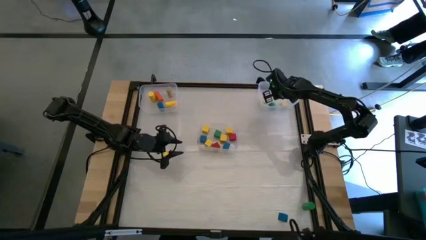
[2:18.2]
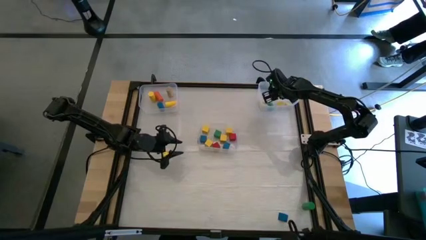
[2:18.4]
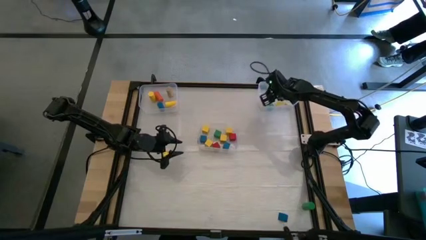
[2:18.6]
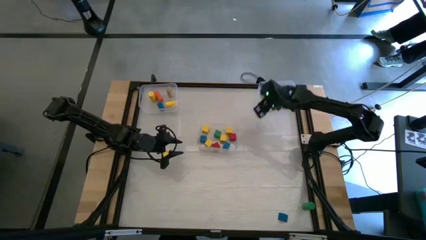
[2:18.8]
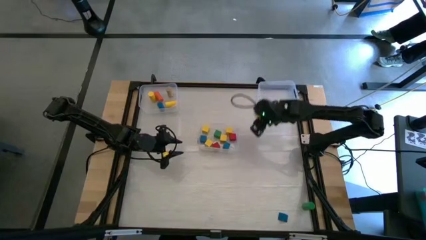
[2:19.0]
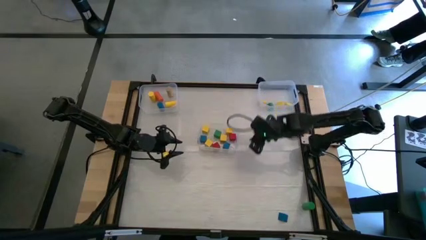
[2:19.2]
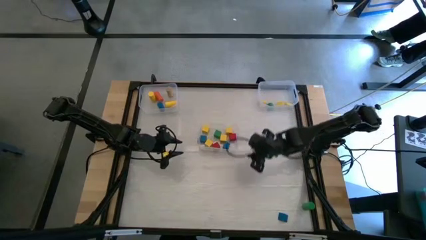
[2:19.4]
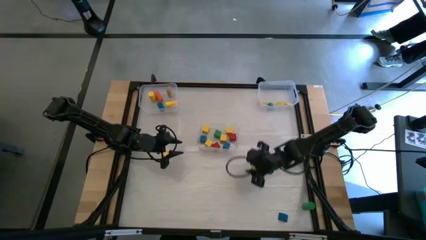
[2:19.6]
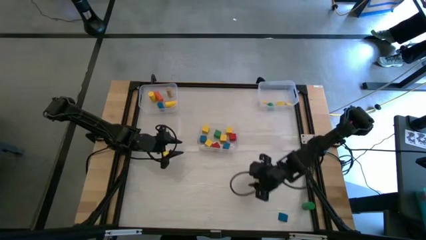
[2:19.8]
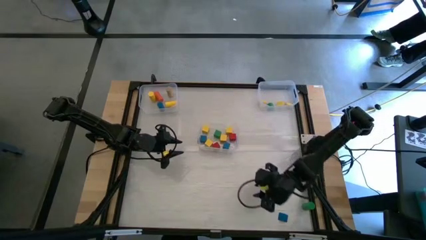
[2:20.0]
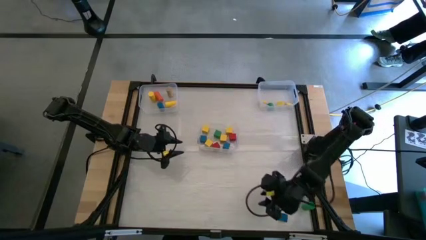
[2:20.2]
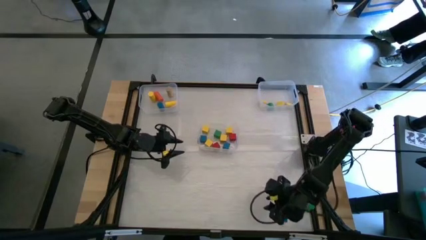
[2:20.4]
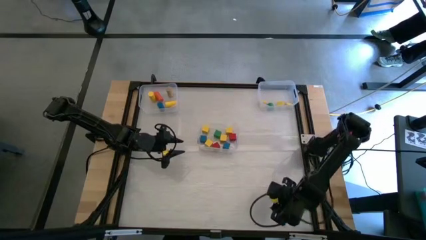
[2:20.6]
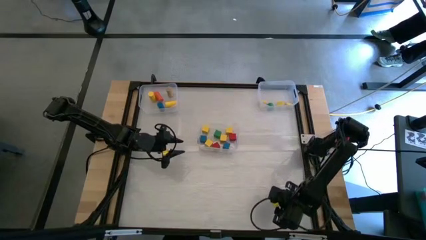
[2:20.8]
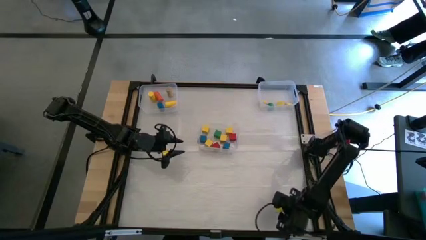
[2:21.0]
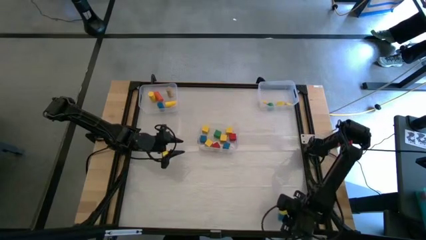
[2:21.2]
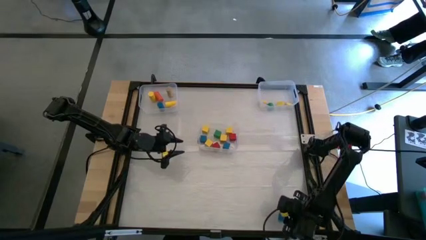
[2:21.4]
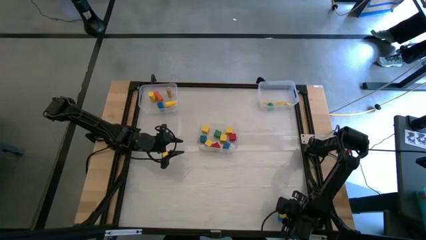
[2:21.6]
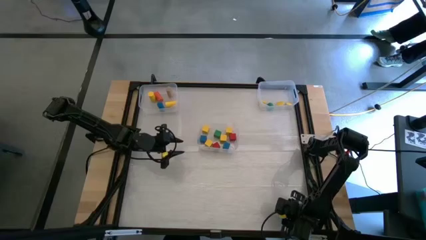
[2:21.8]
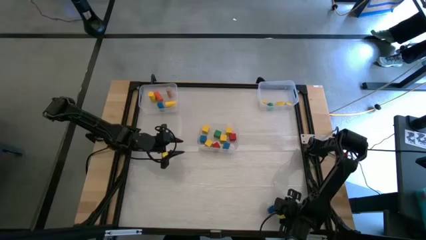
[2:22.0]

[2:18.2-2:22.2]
Task: Sort blocks by size
Put the blue triangular block into the top right transparent bin

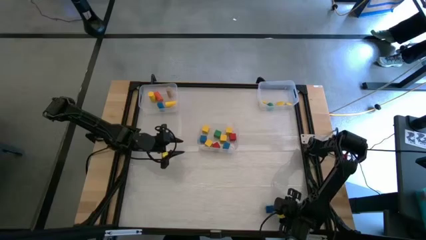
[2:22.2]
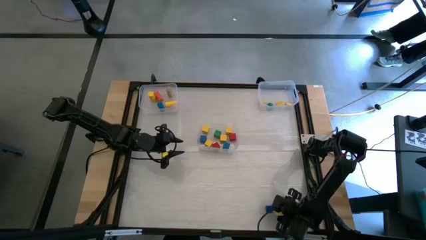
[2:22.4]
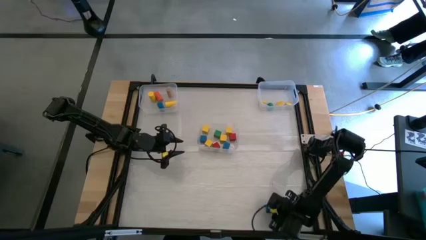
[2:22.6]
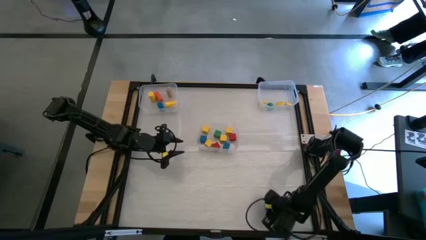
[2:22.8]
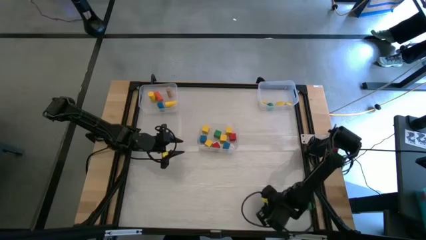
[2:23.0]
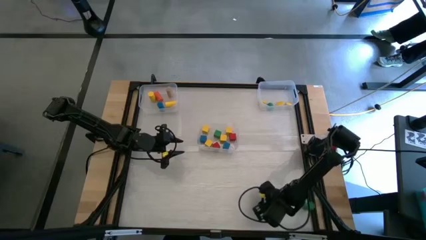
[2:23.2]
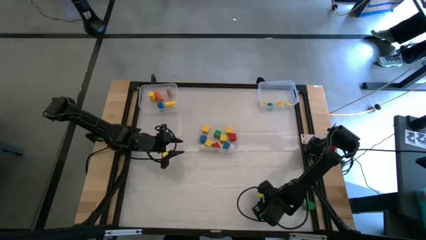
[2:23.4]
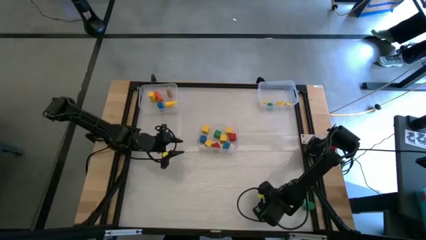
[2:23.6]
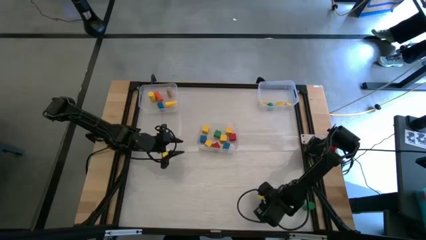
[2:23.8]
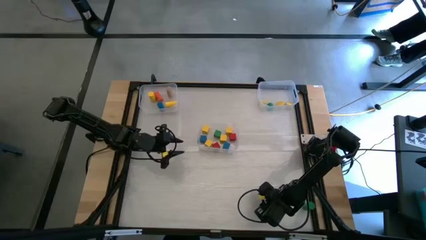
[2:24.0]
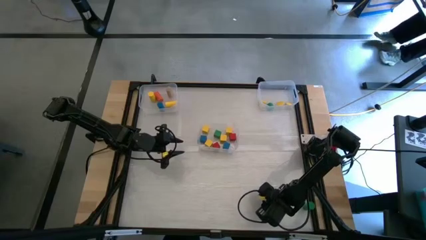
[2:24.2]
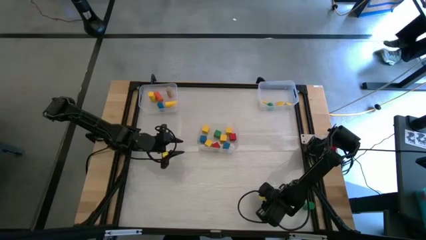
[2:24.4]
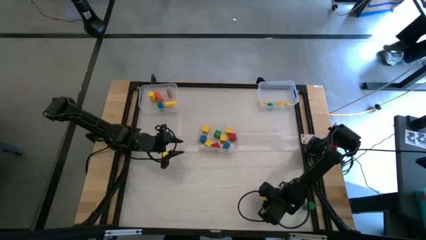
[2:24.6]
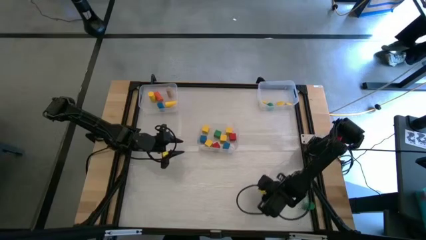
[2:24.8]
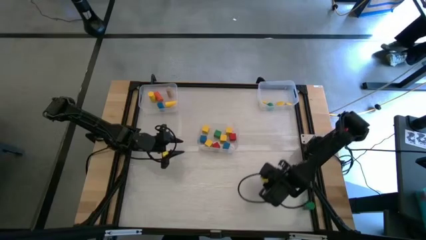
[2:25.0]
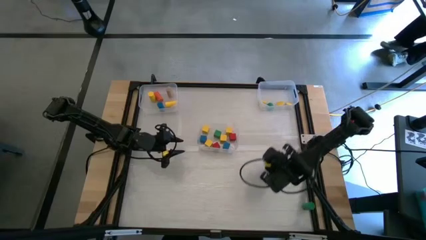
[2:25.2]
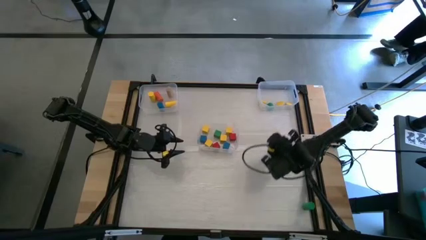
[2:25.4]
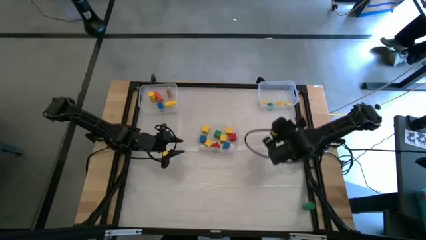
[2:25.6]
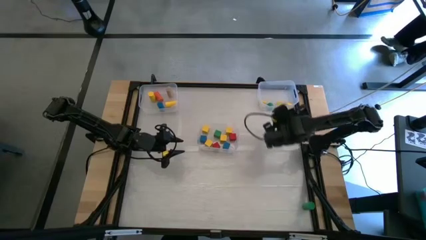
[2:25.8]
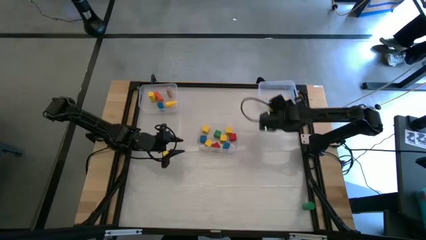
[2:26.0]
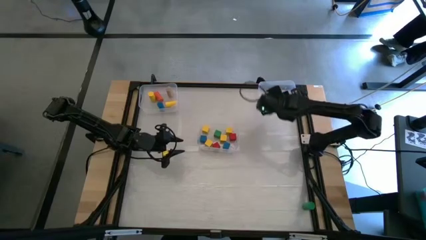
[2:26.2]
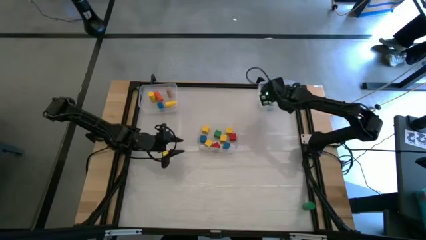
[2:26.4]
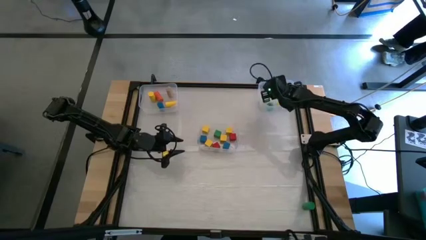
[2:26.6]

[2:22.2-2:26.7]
Put the blue triangular block into the top right transparent bin

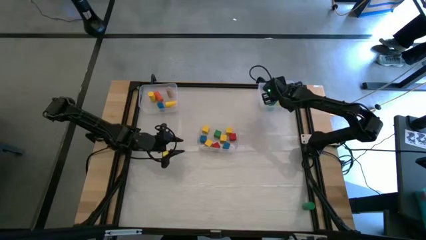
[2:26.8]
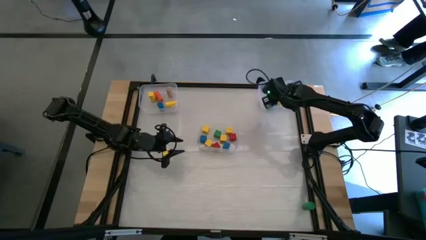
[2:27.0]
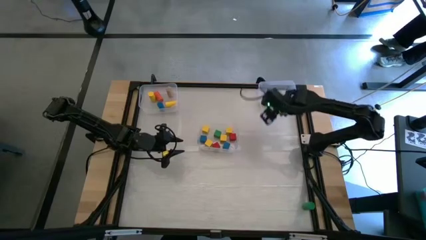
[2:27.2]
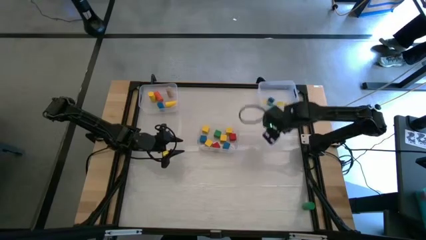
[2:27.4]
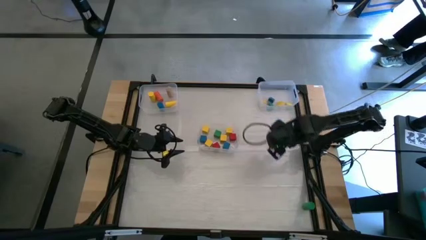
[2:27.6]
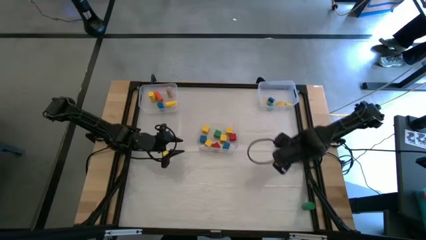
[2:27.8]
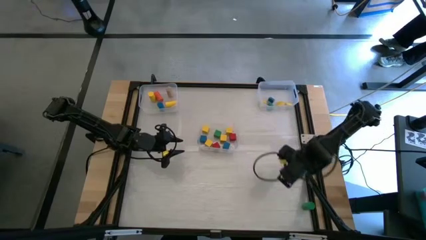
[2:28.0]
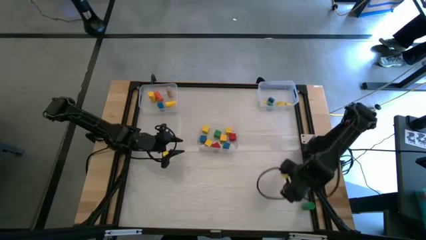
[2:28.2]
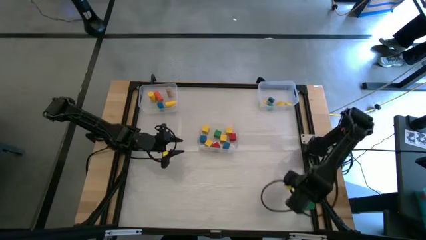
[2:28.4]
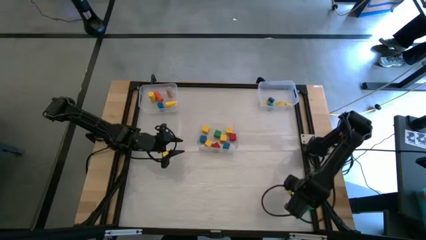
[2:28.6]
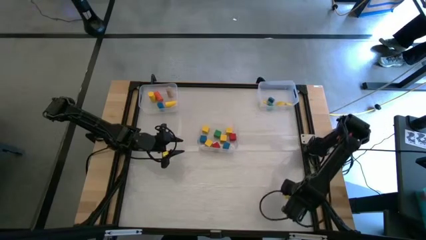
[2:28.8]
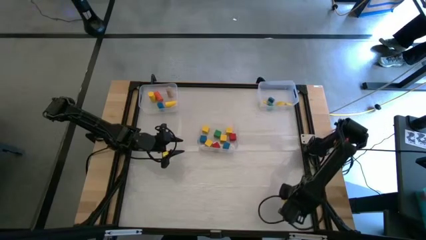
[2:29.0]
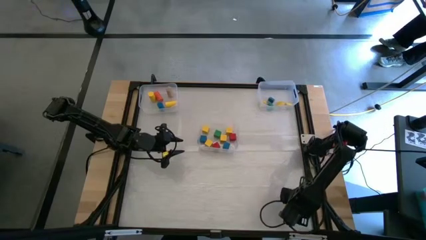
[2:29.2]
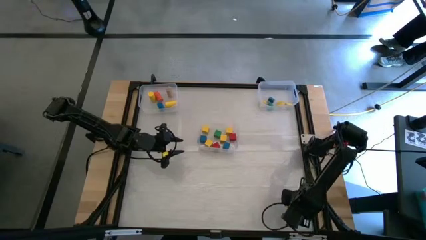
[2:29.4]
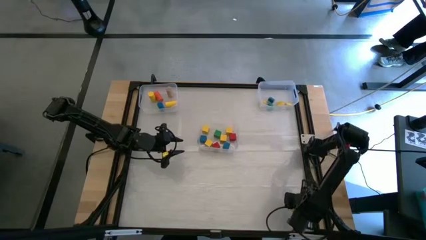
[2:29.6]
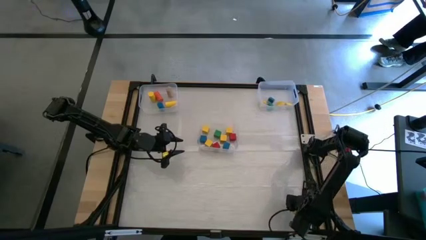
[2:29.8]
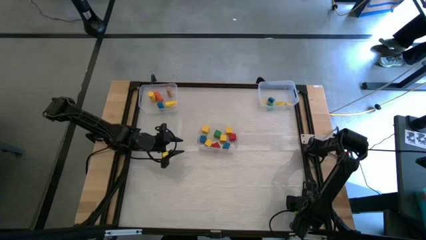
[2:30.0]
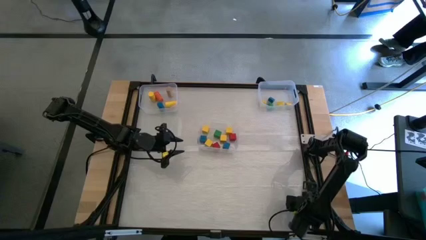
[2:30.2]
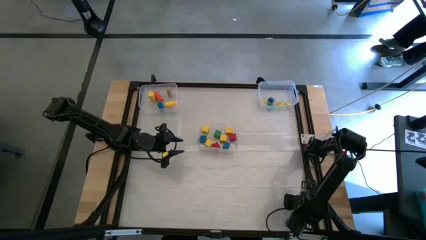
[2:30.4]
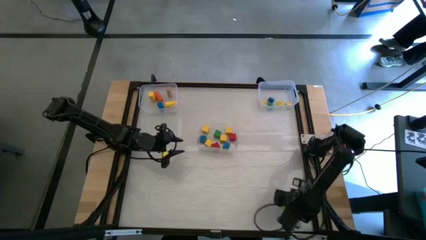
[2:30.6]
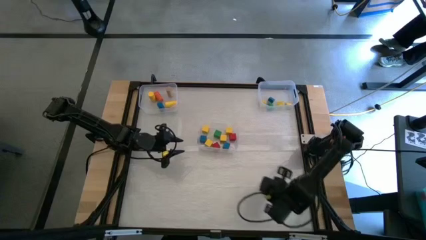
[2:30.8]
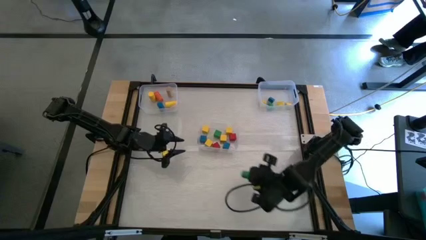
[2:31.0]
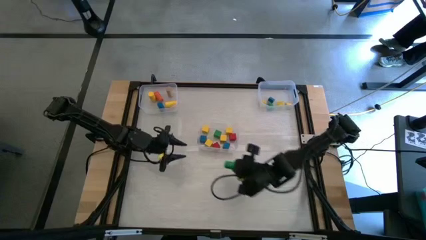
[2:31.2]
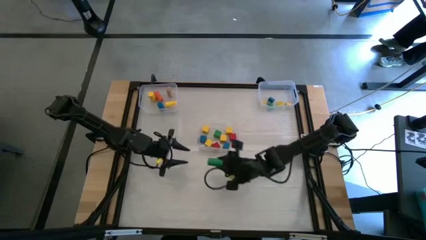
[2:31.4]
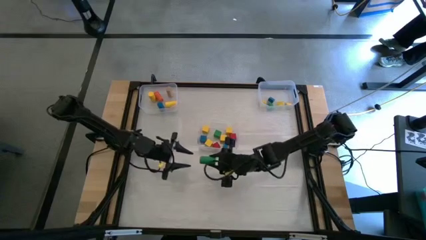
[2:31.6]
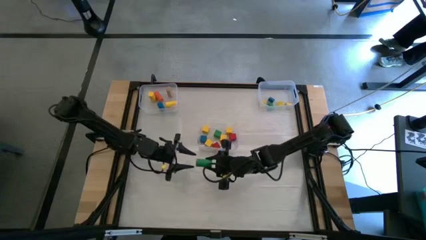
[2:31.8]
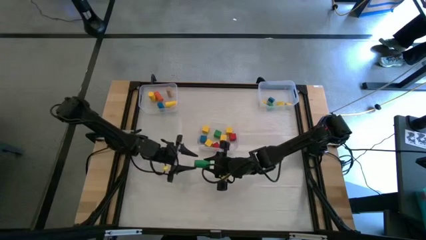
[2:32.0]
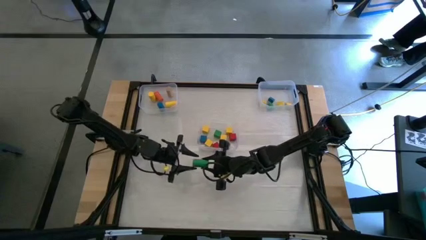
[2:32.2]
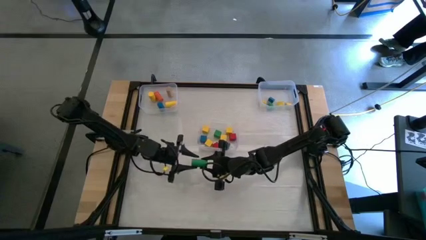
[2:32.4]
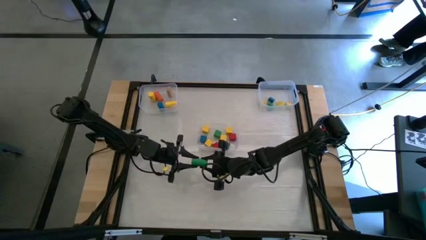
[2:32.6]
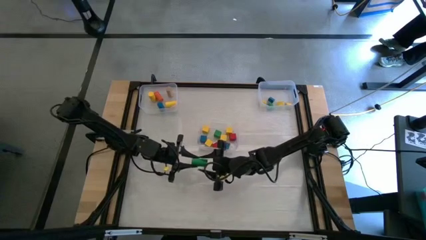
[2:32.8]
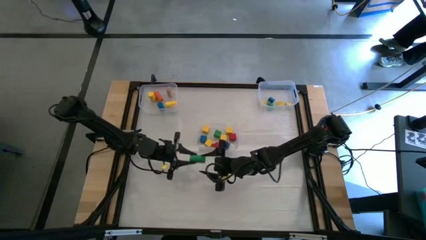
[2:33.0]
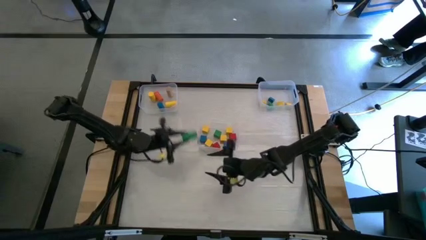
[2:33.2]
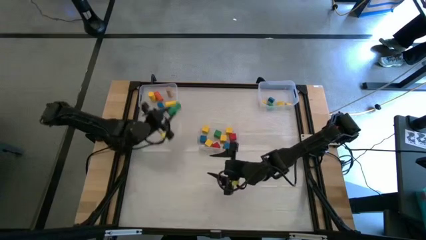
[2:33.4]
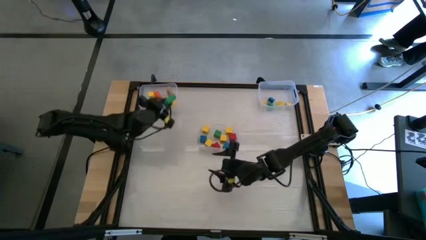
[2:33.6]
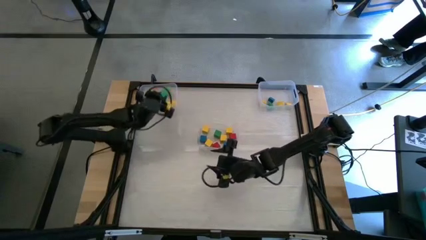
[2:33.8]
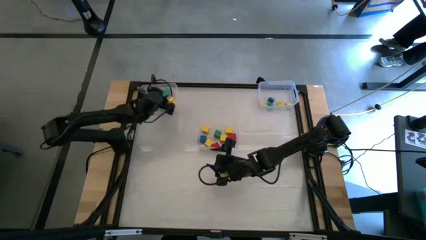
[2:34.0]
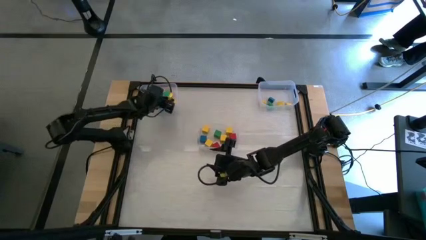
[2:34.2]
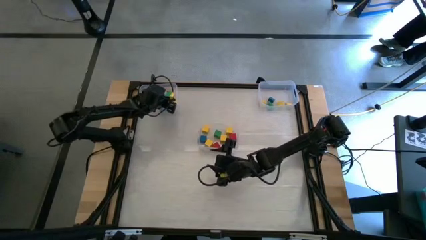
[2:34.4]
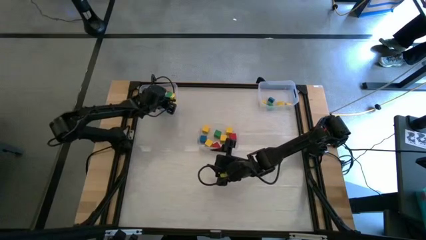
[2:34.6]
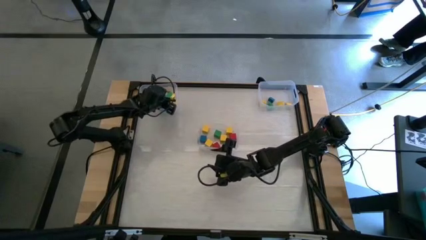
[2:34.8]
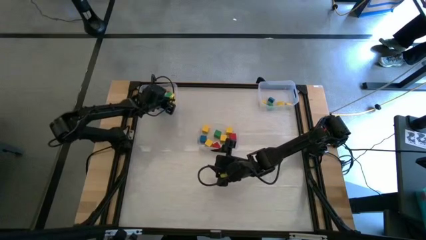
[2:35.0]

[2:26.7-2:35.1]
Put the green cylindrical block into the top left transparent bin
